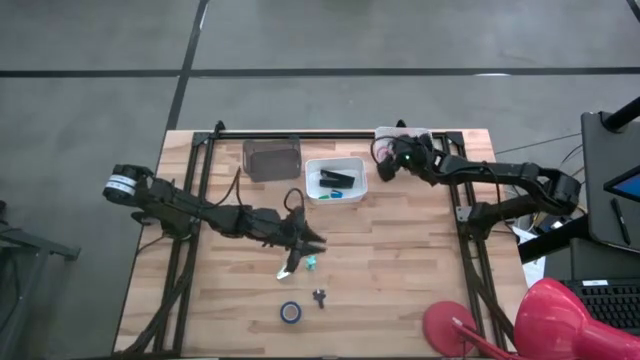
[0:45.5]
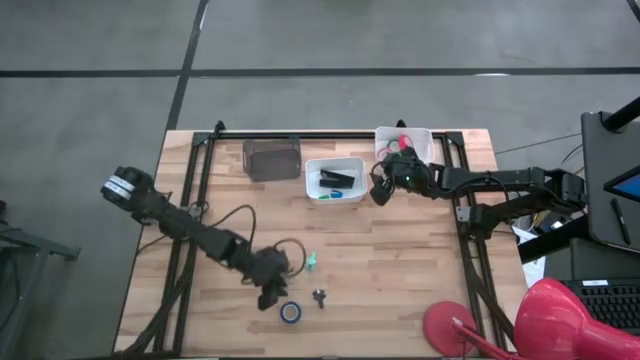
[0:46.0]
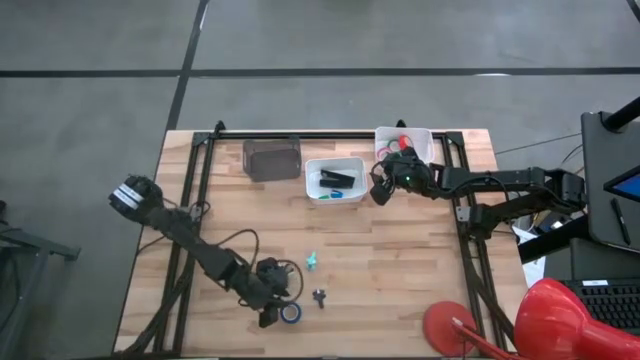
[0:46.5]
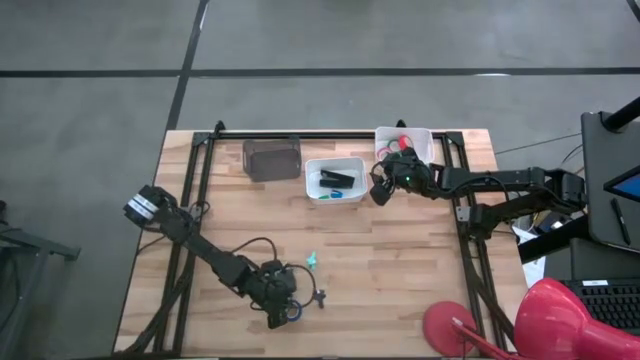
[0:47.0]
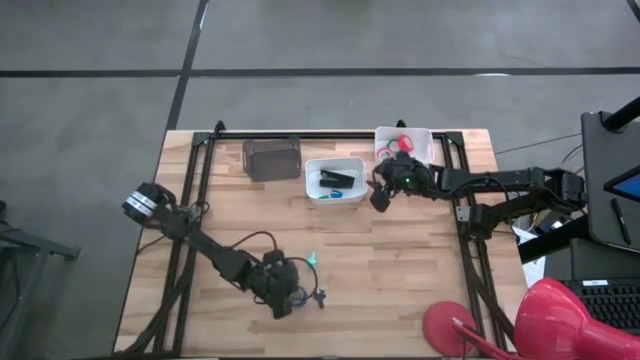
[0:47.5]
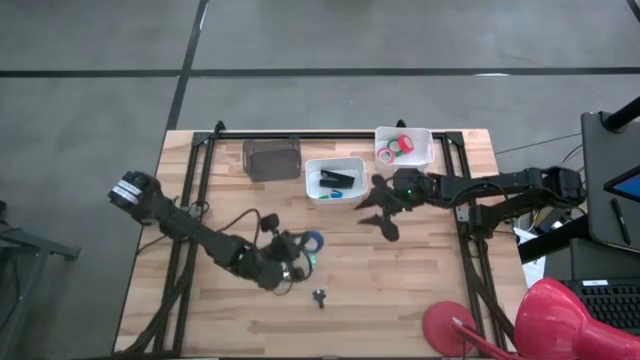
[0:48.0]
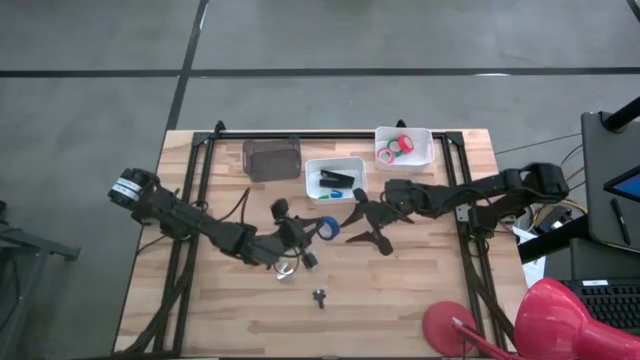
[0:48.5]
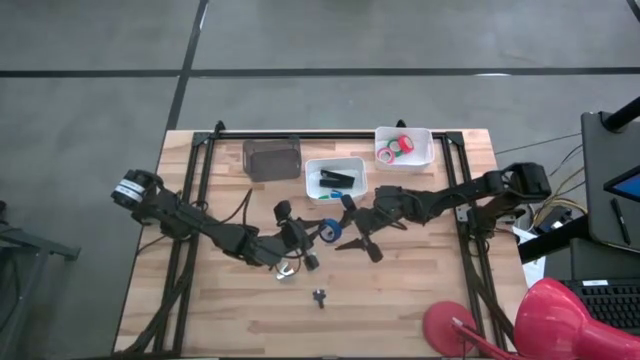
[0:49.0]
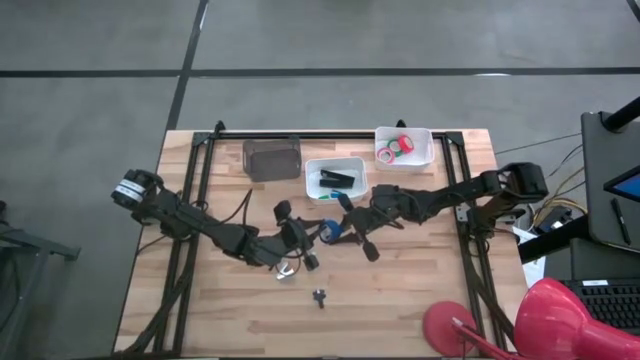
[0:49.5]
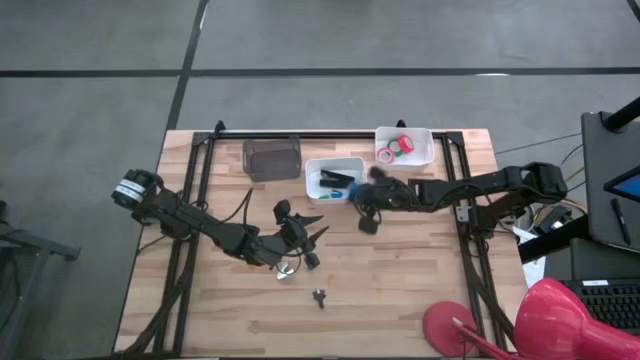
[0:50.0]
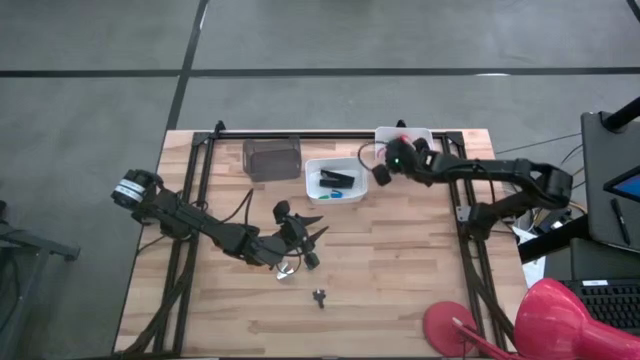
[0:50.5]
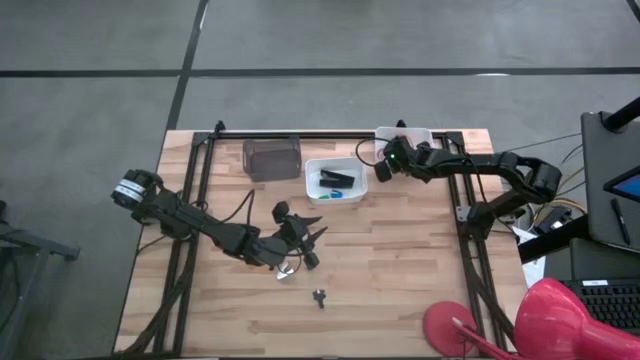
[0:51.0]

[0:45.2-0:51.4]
Task: Pick and place Stapler, Stapler remover, tape
Put the blue tape into the right white bin

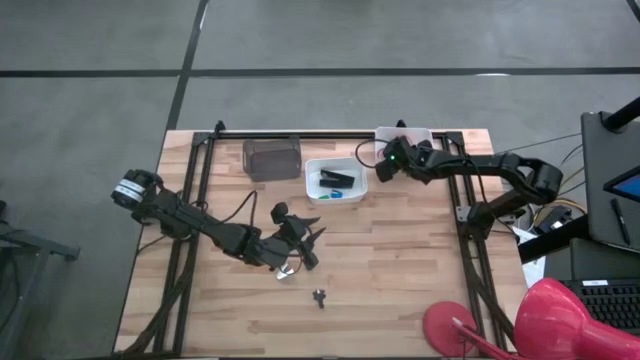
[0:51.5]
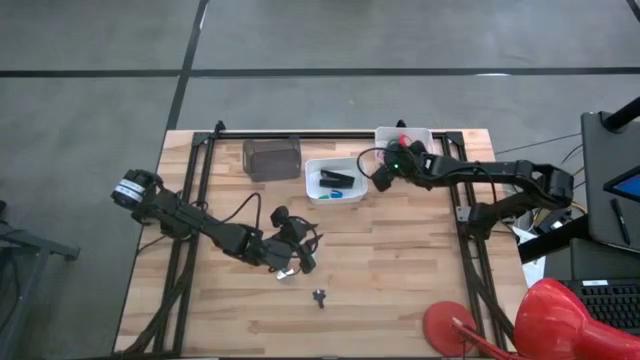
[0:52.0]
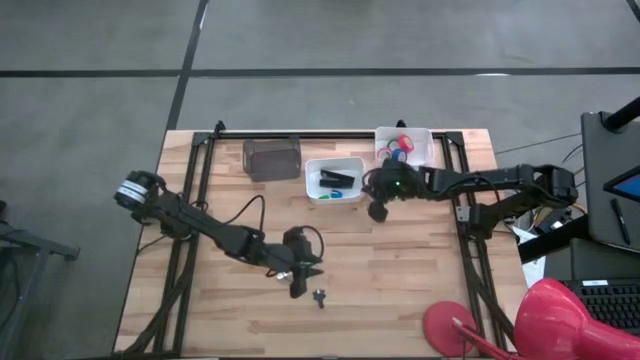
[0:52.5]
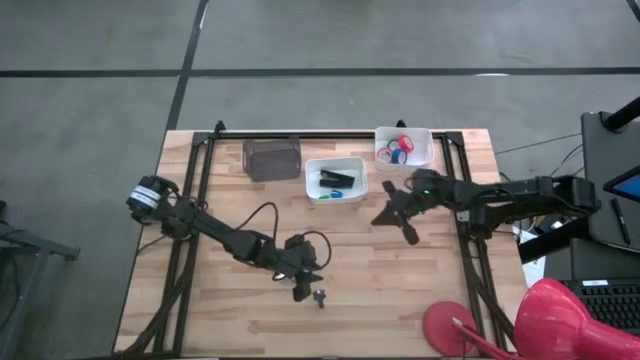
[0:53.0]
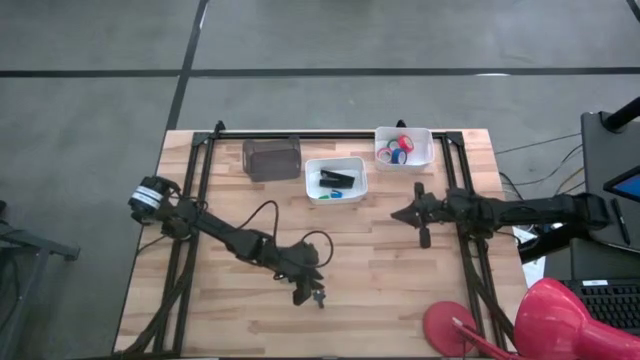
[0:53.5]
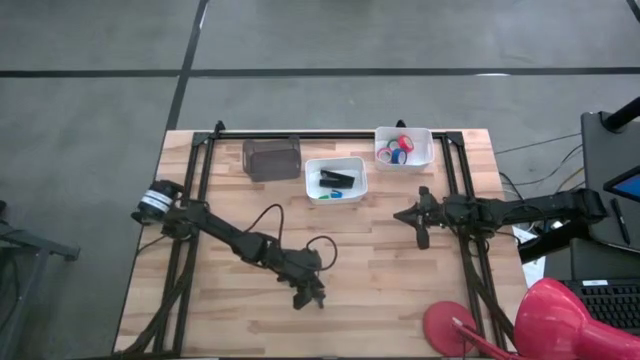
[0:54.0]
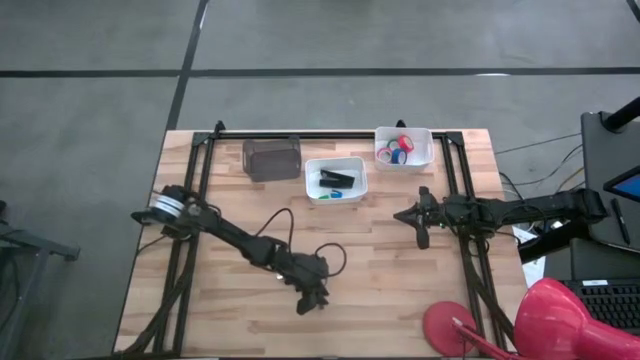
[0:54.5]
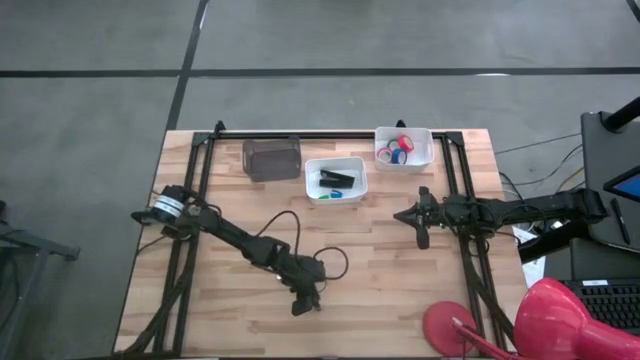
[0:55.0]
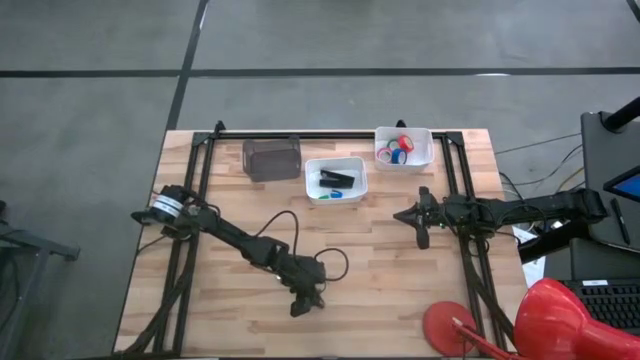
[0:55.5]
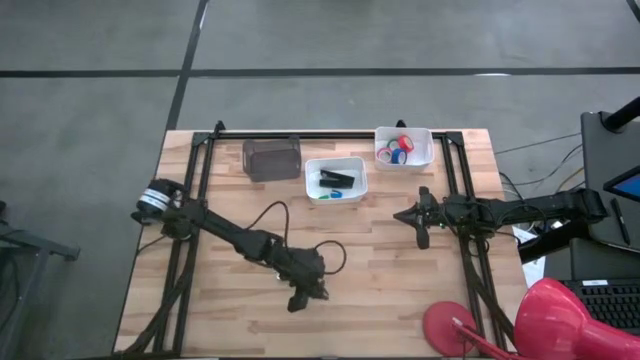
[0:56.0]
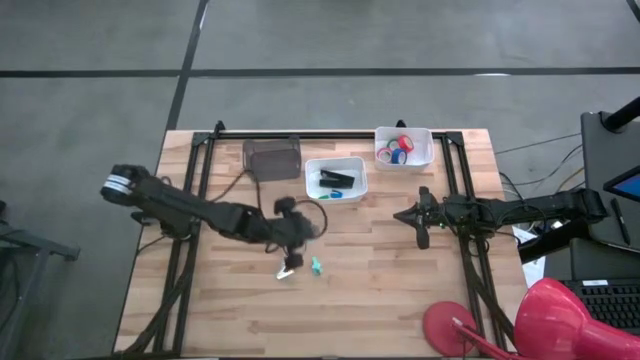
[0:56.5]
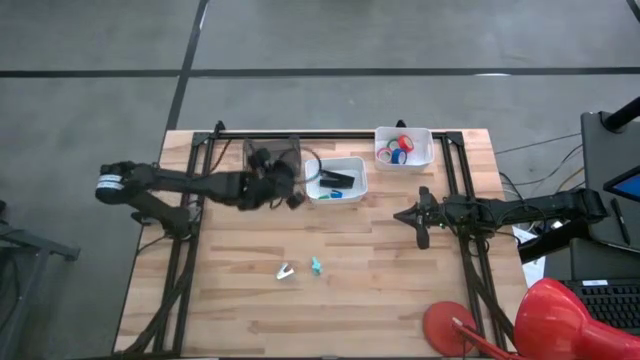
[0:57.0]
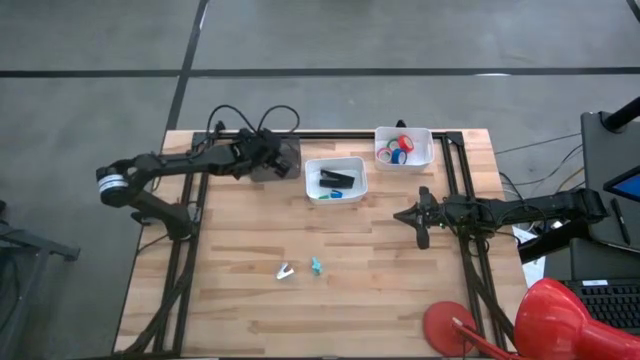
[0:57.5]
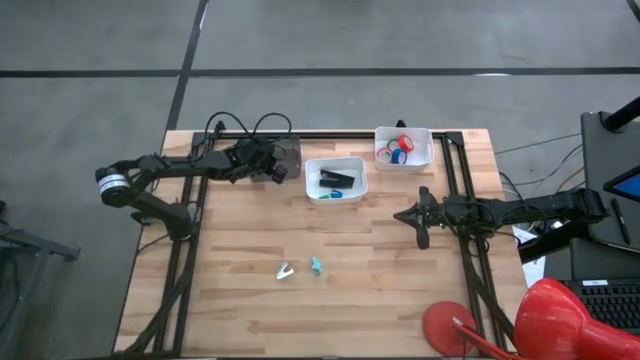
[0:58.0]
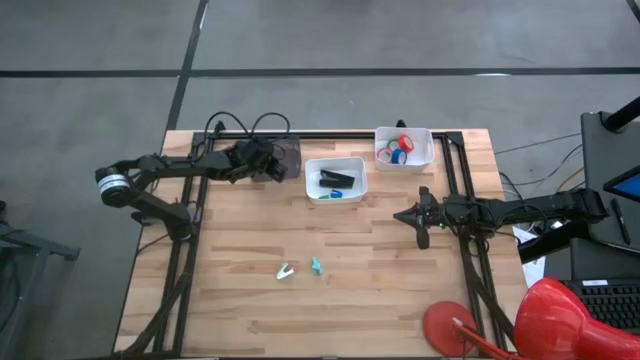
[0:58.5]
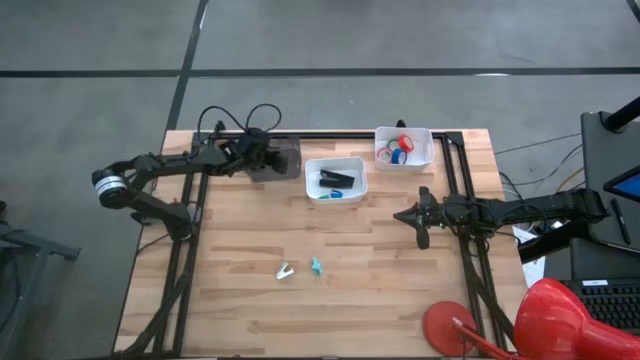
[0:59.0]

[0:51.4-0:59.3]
Put the black staple remover into the black bin

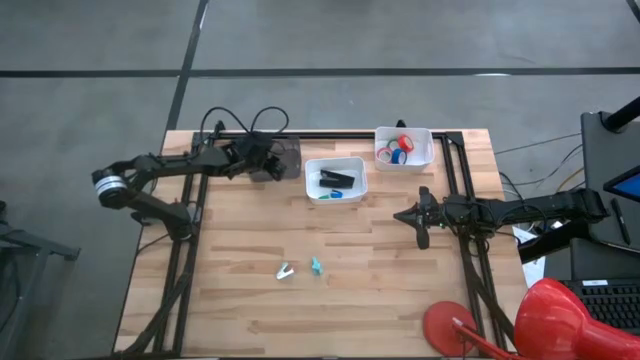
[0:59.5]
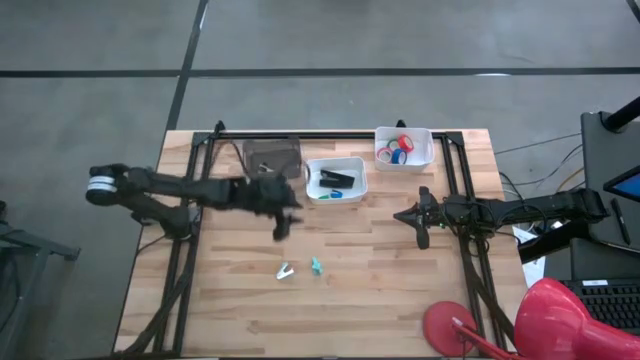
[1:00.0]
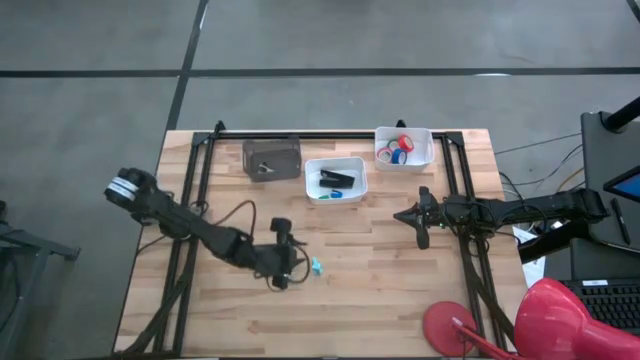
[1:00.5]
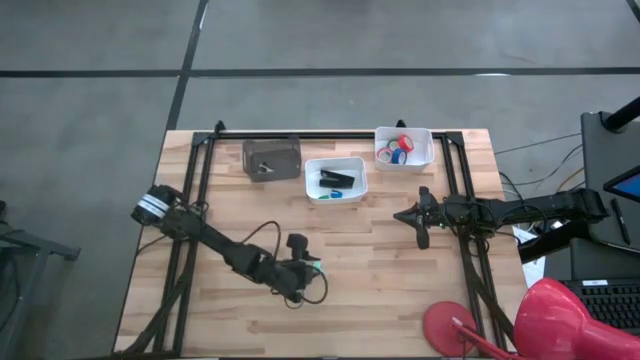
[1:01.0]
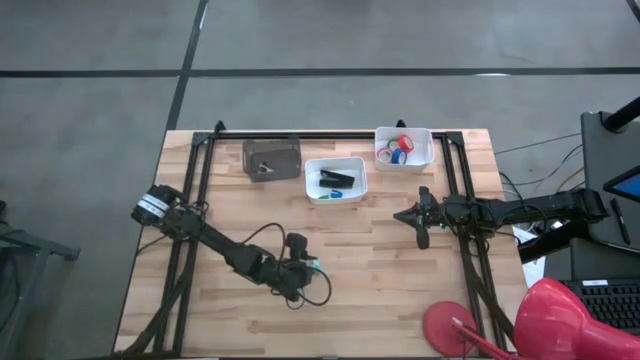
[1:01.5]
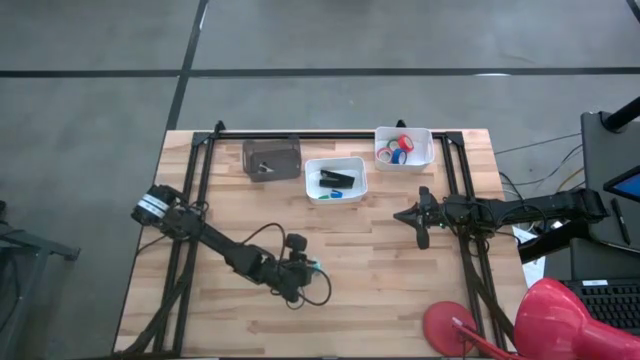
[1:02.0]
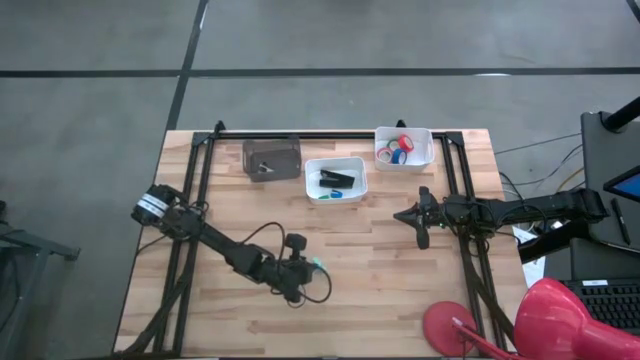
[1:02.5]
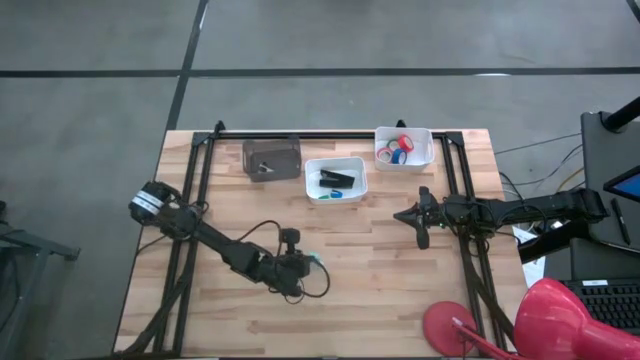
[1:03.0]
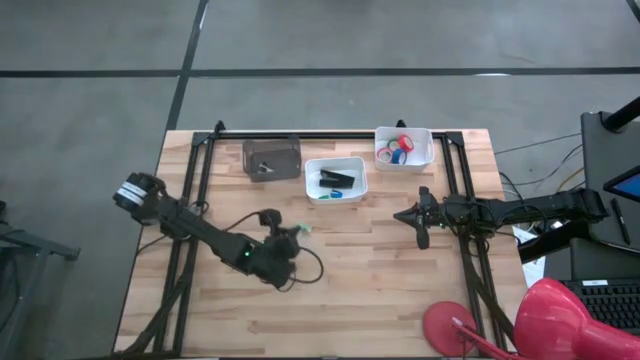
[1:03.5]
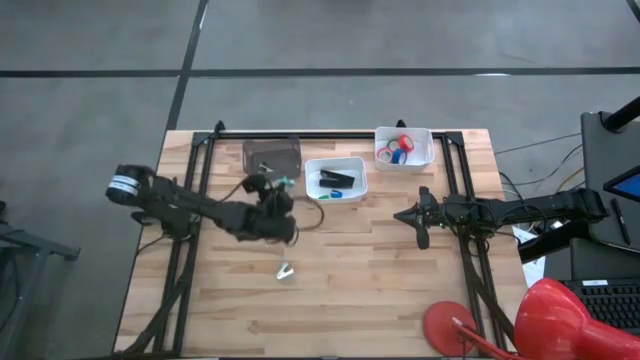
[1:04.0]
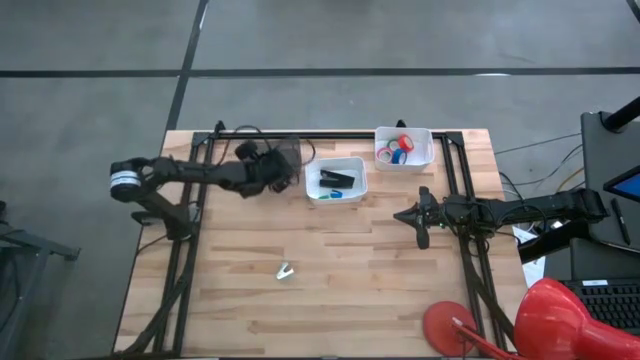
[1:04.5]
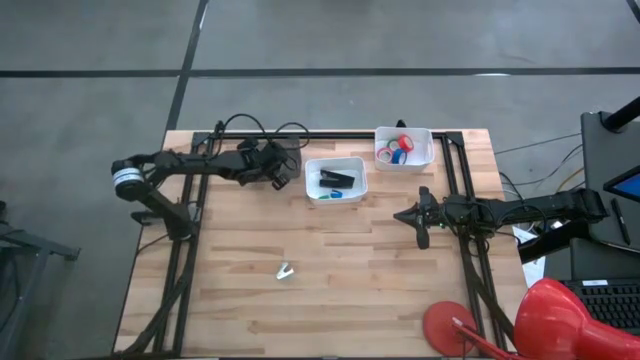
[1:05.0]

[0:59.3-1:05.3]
Put the right light blue staple remover into the black bin

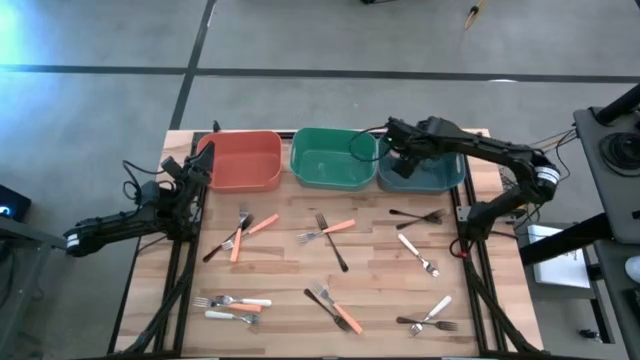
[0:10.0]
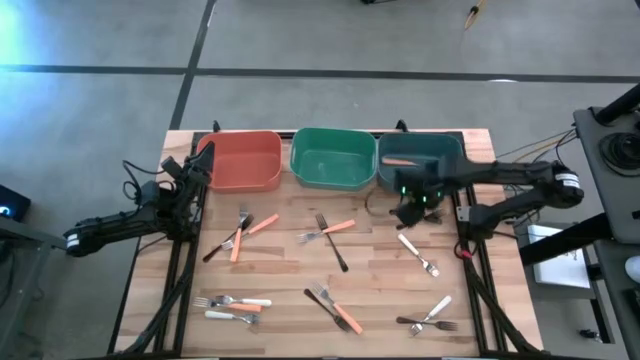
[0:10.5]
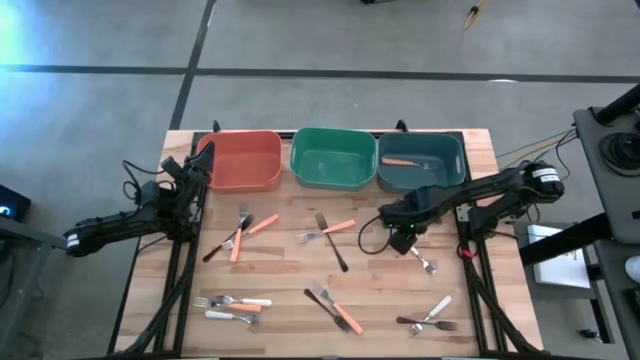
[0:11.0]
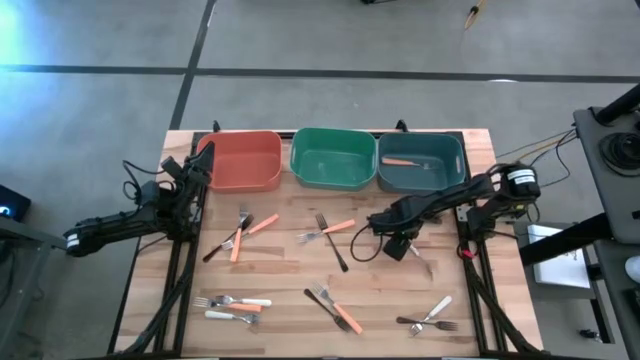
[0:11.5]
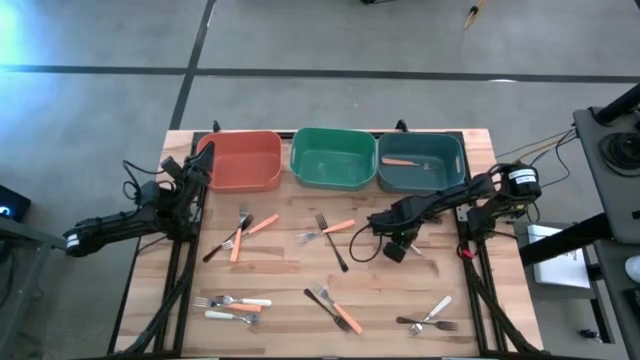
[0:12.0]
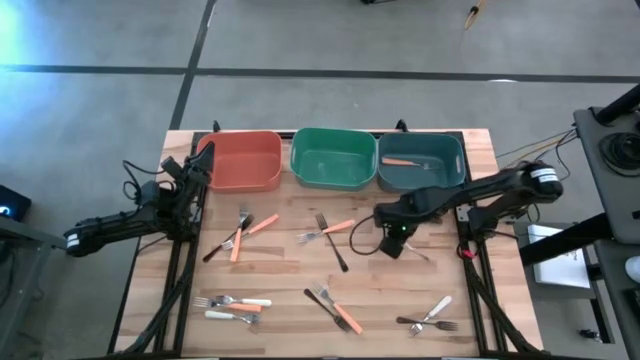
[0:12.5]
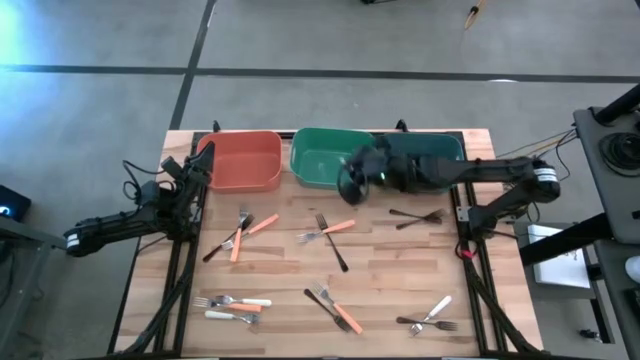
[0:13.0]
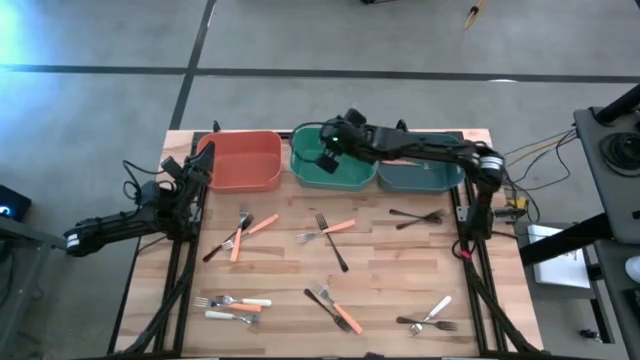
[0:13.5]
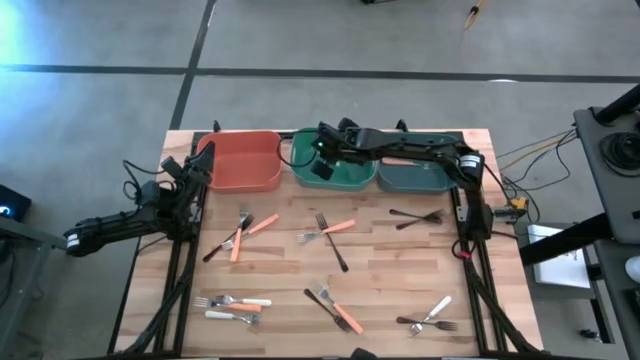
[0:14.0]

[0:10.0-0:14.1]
Task: Sort silverware by color (type)
Put the white fork into the green bin
